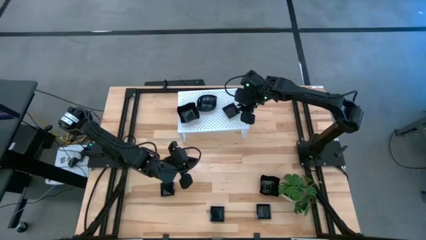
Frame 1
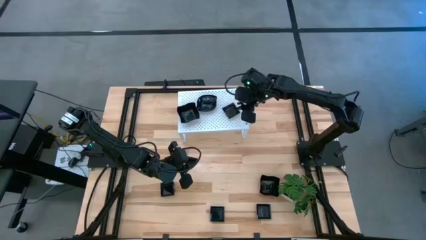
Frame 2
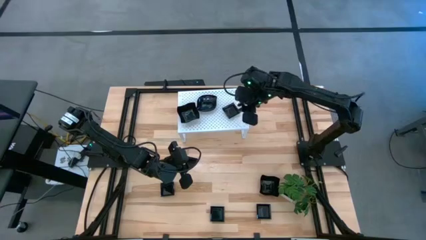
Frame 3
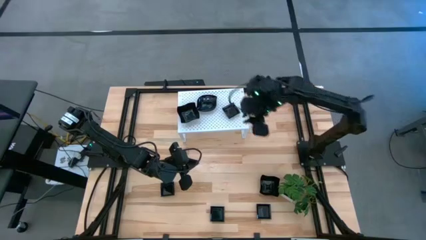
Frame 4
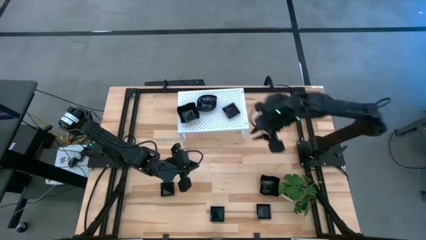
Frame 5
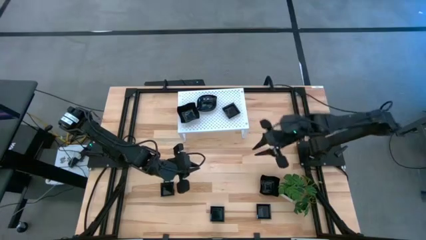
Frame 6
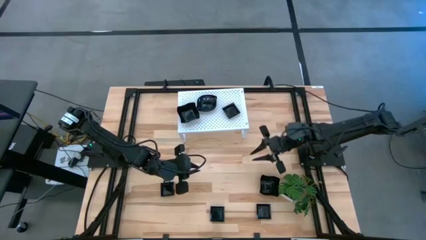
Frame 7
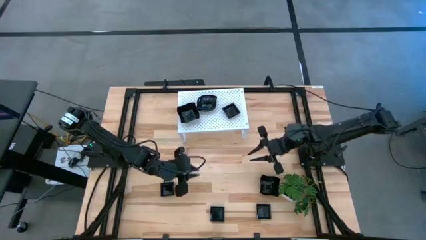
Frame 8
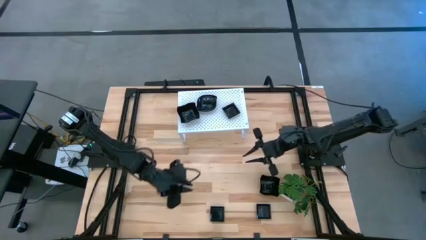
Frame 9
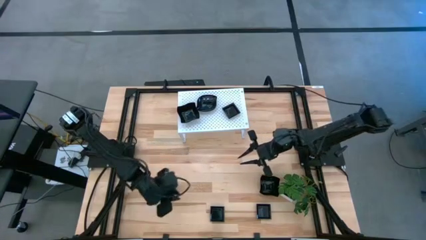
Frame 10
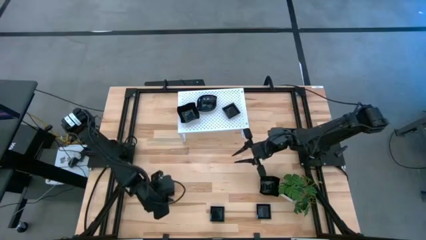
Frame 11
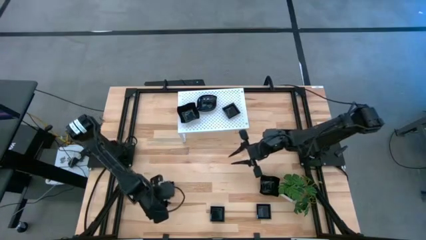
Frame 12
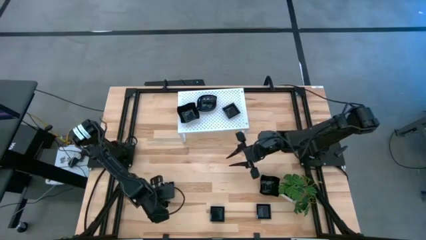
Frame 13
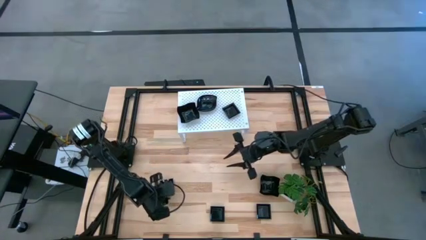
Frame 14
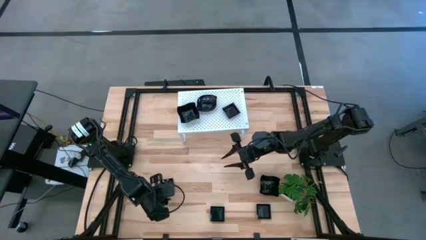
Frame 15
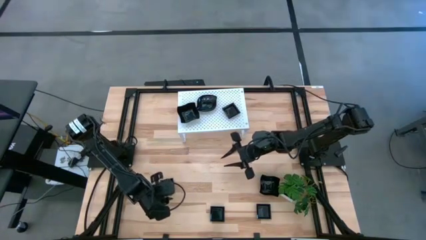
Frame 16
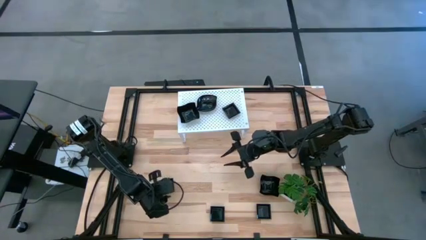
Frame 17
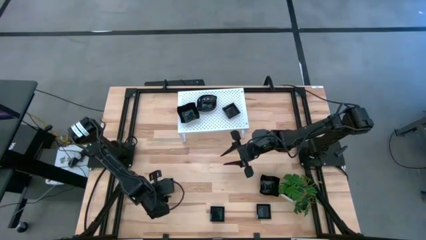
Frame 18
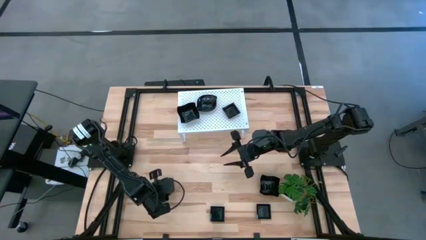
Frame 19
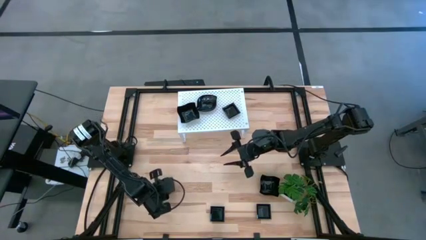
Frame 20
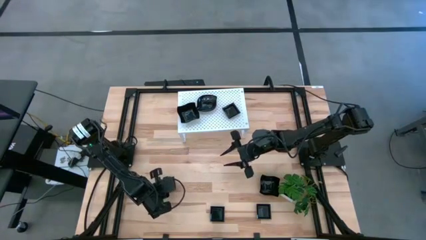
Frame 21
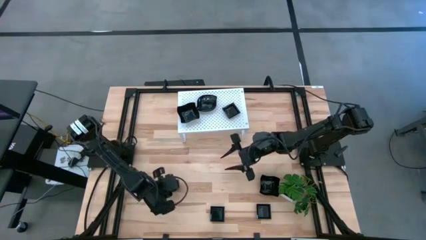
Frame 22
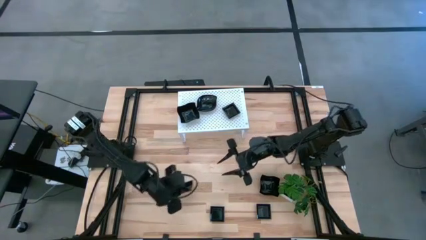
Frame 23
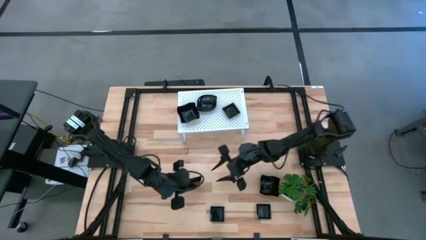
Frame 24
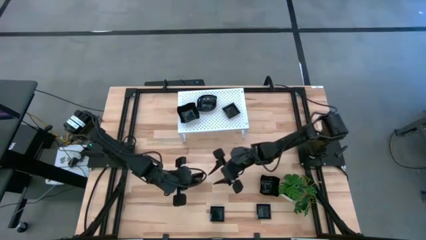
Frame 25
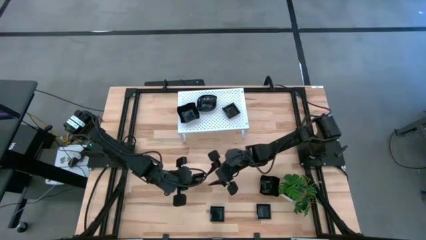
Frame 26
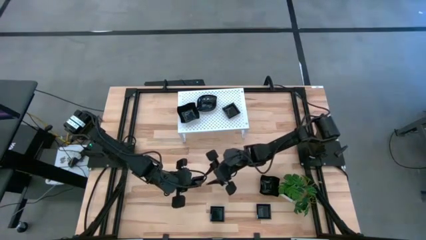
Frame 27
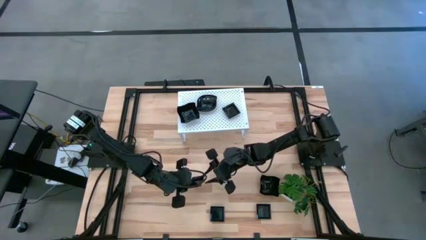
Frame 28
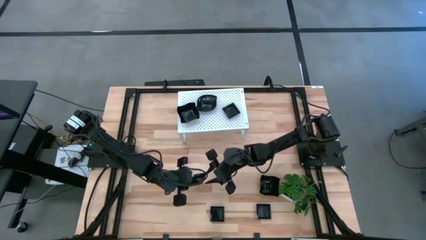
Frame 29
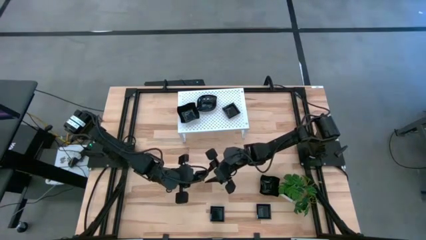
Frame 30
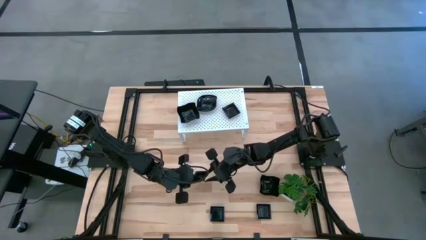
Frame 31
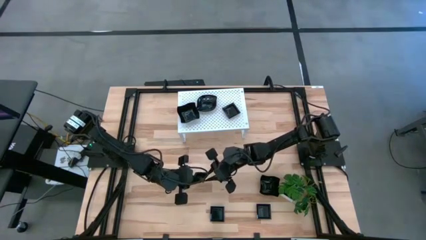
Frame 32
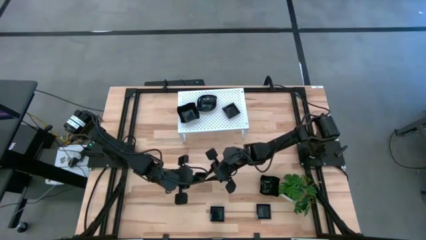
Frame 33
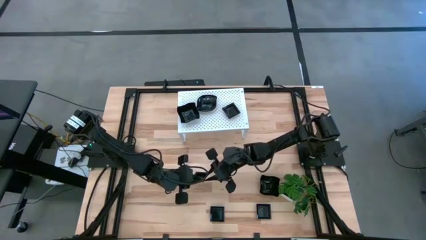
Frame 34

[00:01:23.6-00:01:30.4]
Task: Pick & Place Mini shaped plates
Stack the black square plate on top of the black square plate on the shelf

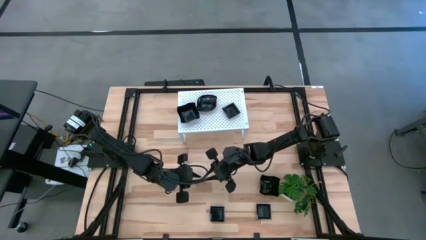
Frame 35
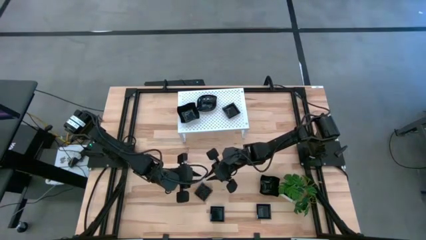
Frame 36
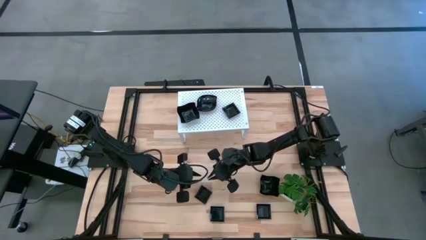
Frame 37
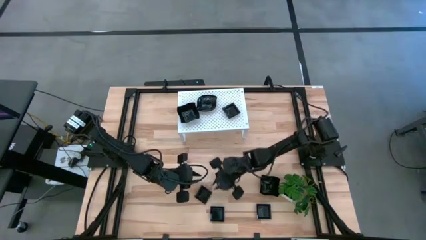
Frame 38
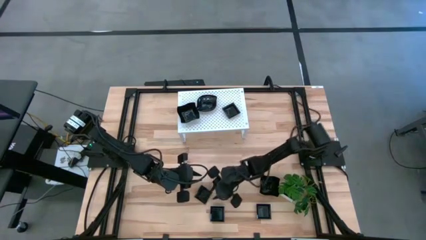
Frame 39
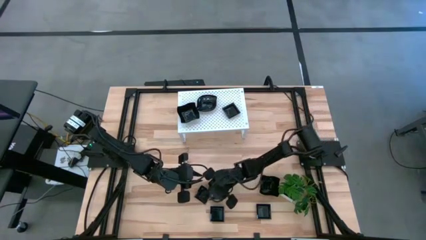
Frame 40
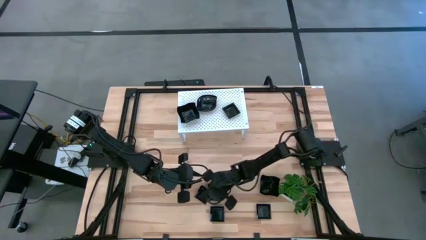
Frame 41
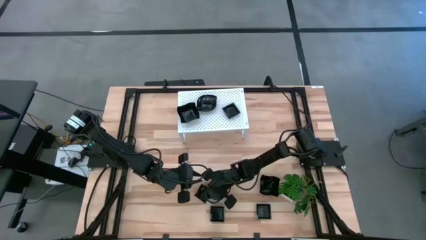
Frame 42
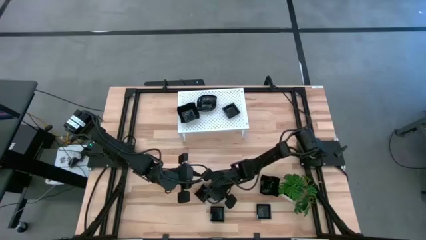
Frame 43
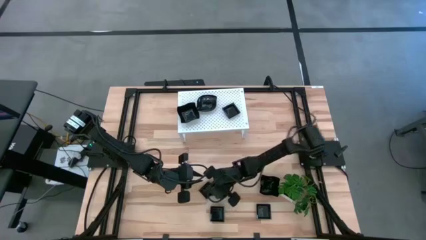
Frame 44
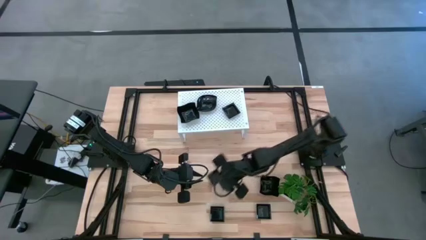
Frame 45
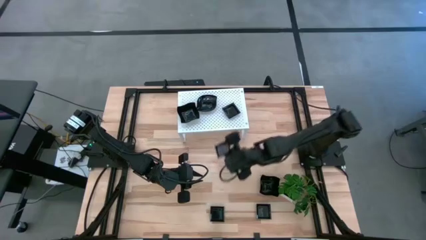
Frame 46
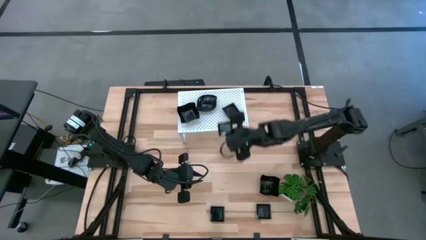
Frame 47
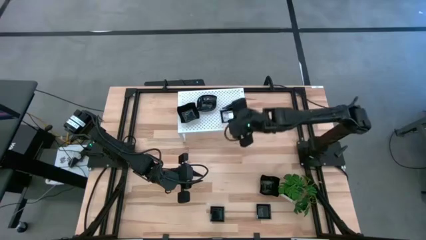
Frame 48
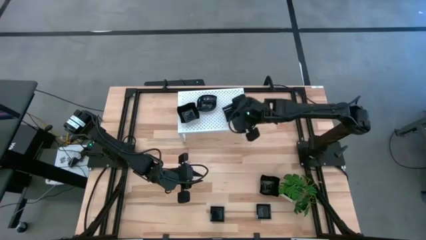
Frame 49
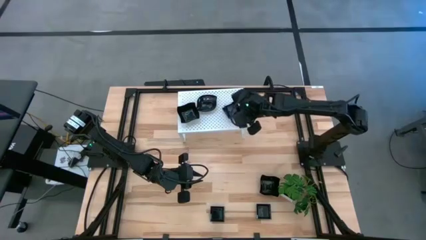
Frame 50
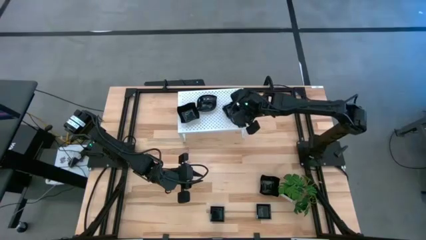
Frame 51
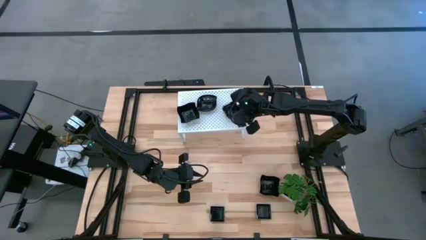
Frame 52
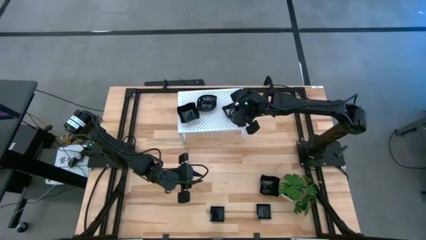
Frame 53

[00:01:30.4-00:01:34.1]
Stack the black square plate on top of the black square plate on the shelf

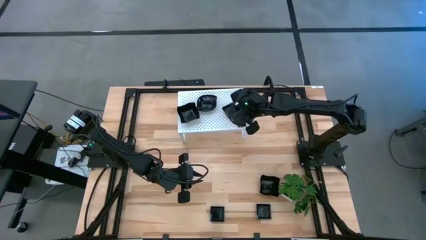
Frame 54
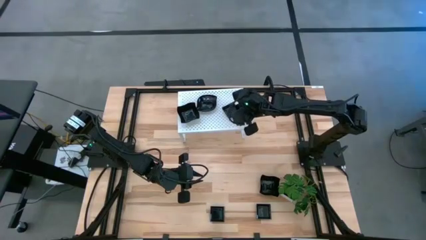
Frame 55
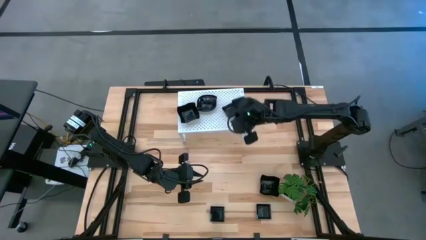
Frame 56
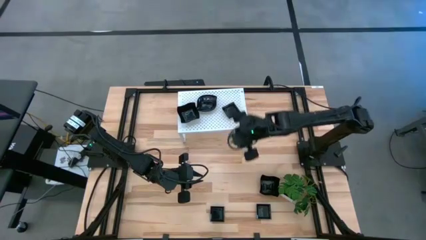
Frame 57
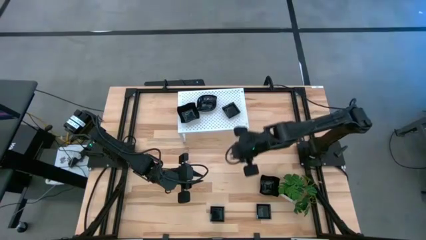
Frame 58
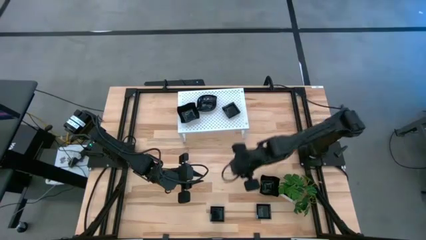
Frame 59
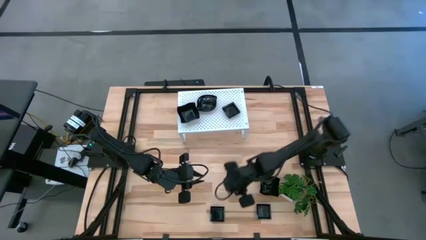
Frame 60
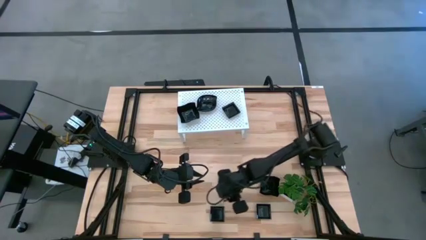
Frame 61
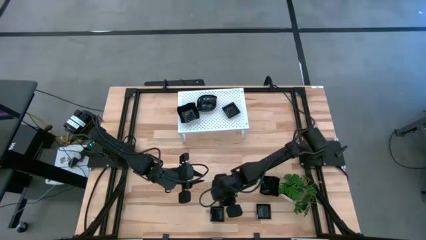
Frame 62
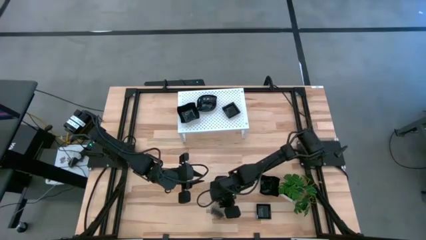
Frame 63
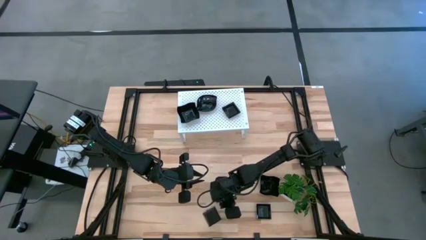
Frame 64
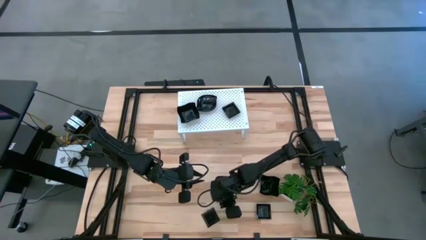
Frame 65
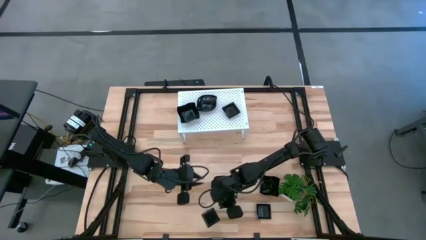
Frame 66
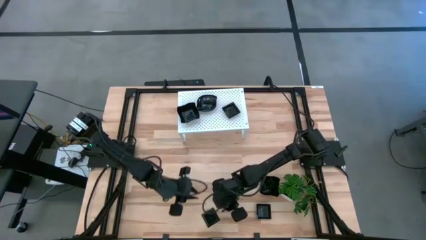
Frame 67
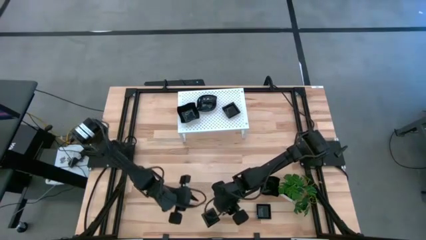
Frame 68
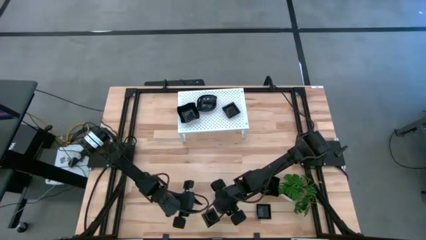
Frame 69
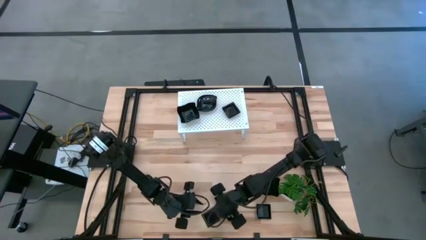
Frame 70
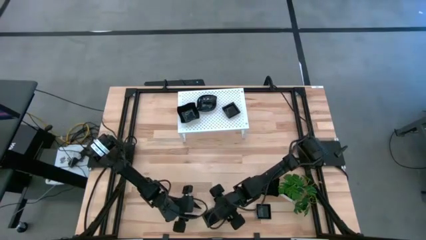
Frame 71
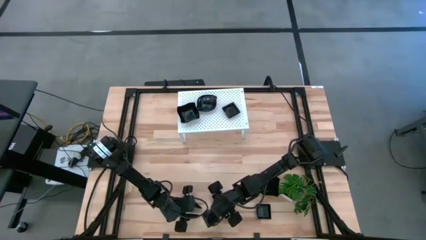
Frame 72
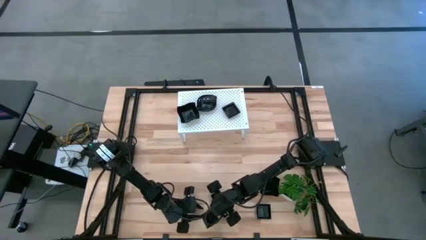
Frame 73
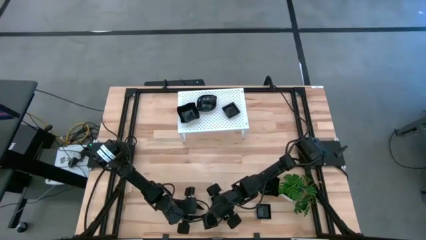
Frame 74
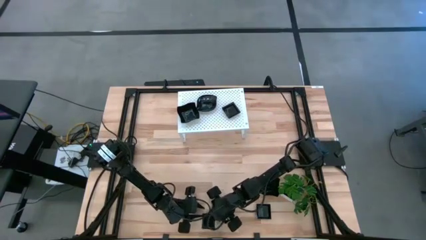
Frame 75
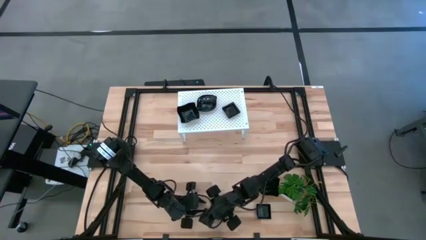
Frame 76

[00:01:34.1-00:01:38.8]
Stack the black square plate on top of the black square plate on the shelf

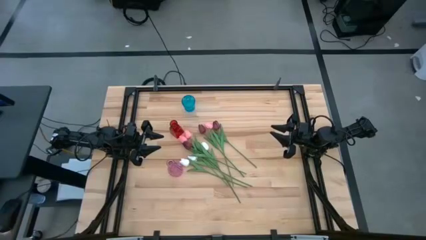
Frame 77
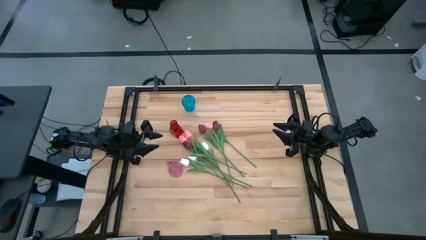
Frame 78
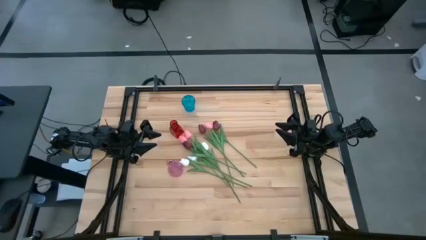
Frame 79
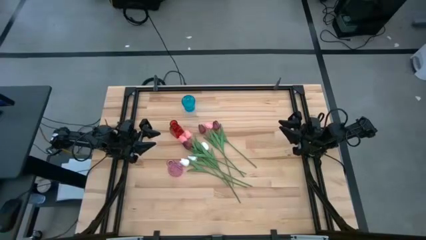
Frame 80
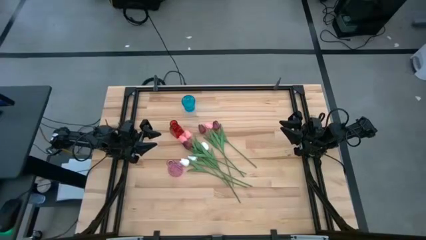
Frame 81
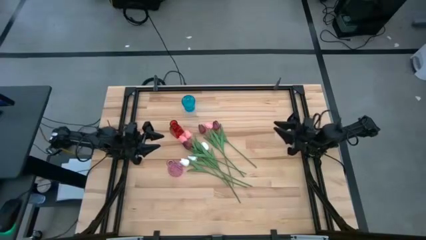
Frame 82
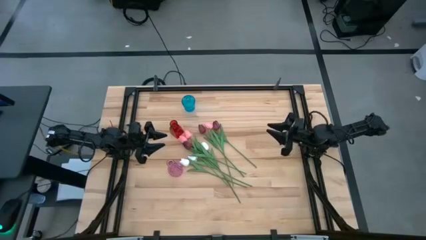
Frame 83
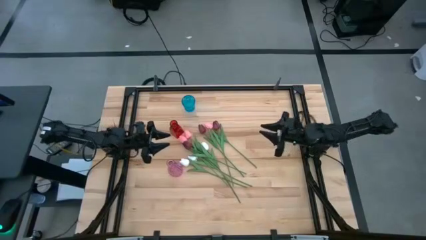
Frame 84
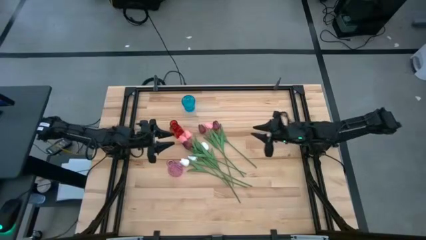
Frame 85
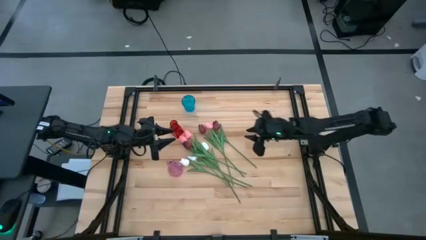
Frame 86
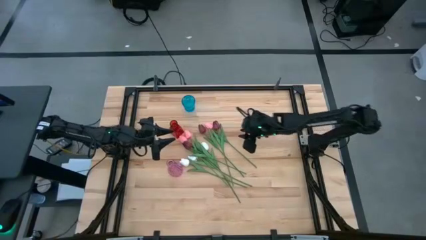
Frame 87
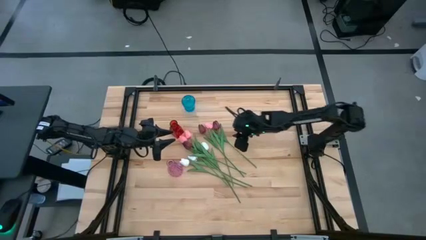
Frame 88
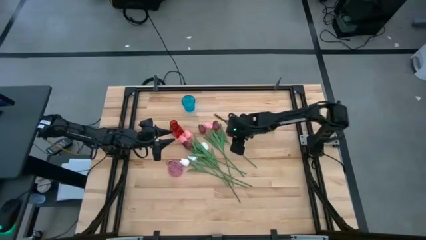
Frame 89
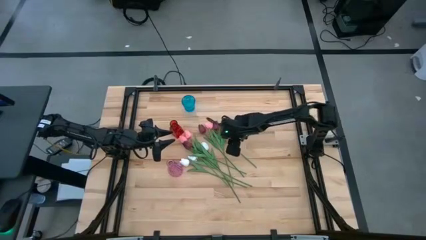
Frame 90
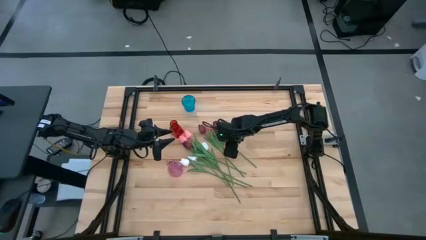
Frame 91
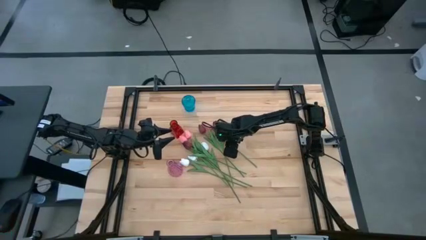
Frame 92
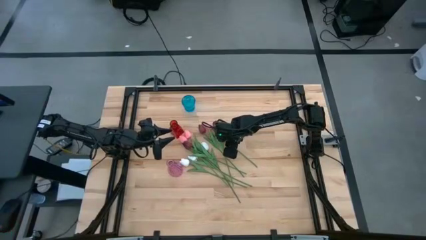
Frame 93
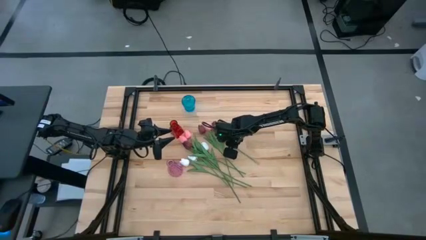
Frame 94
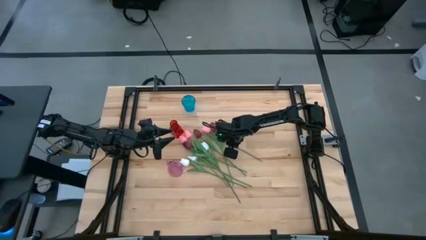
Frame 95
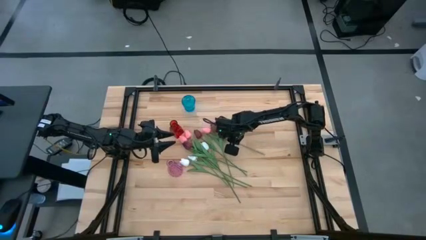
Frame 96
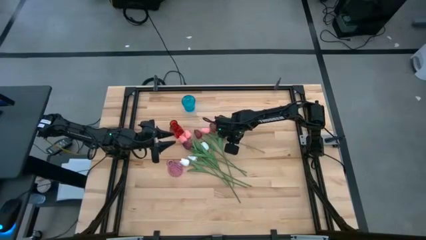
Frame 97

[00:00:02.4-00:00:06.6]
Task: Sort flowers into vase by color
Put the pink tulip into the red vase
